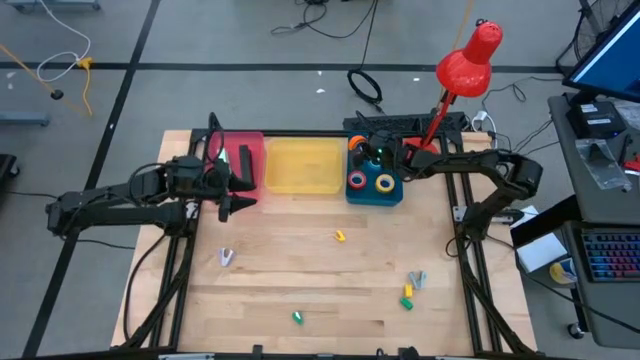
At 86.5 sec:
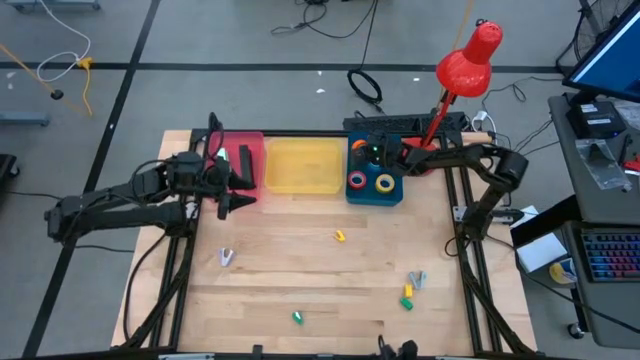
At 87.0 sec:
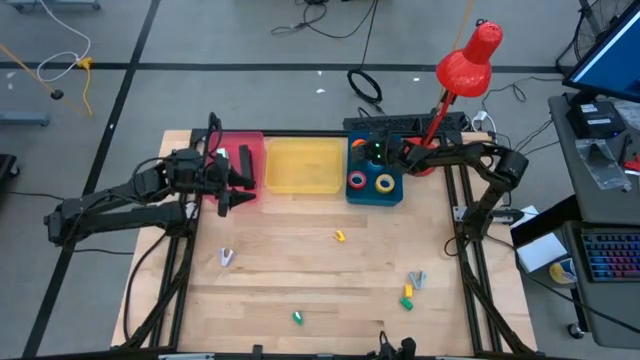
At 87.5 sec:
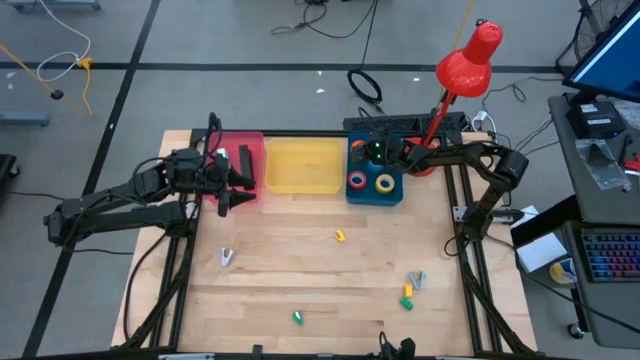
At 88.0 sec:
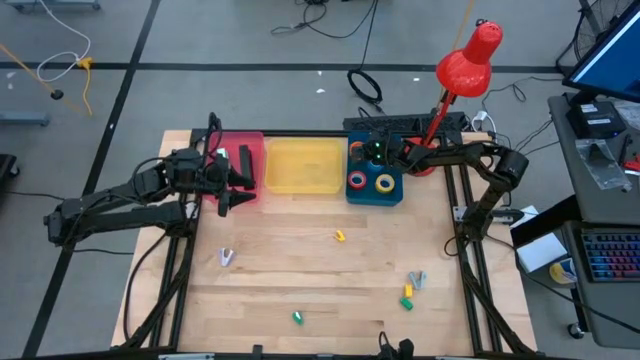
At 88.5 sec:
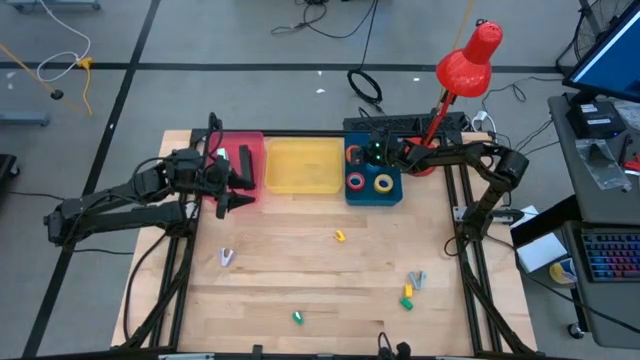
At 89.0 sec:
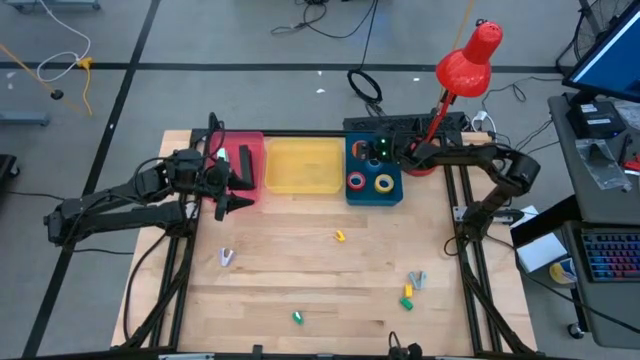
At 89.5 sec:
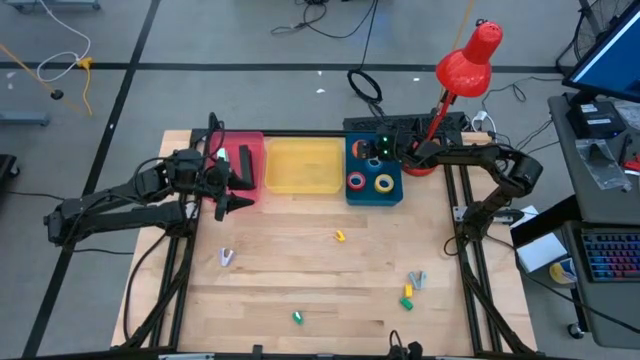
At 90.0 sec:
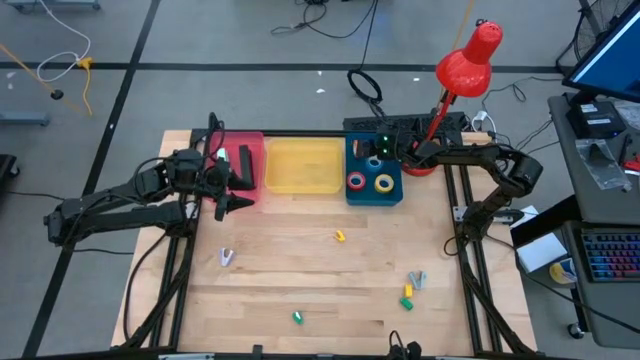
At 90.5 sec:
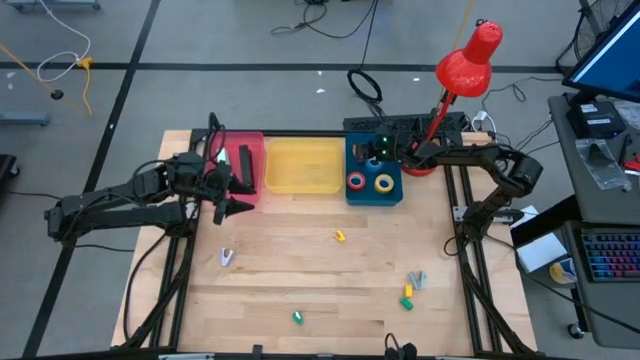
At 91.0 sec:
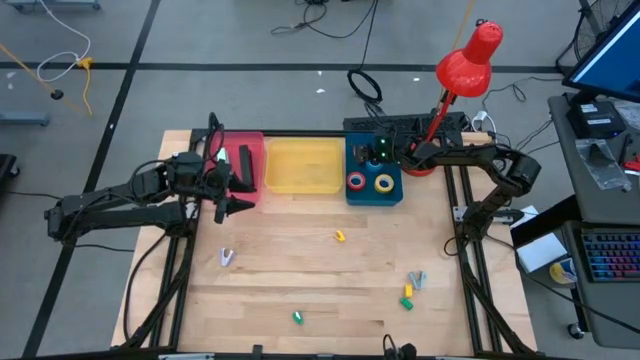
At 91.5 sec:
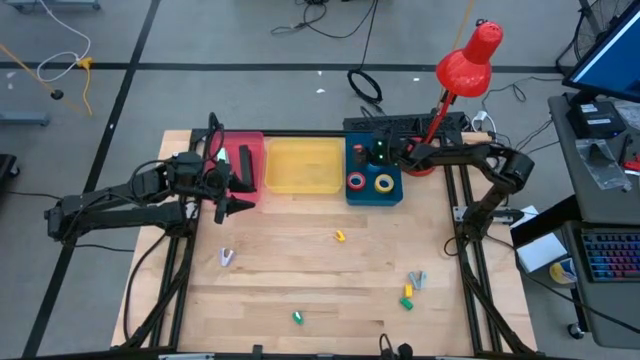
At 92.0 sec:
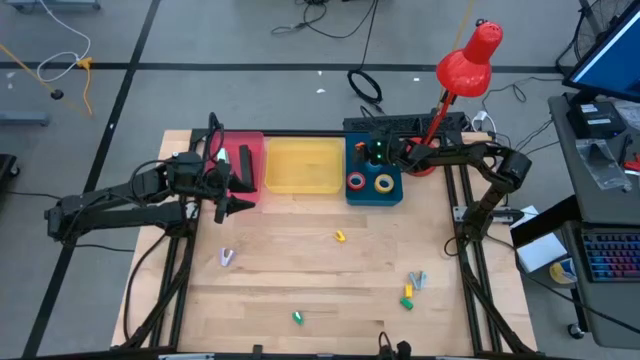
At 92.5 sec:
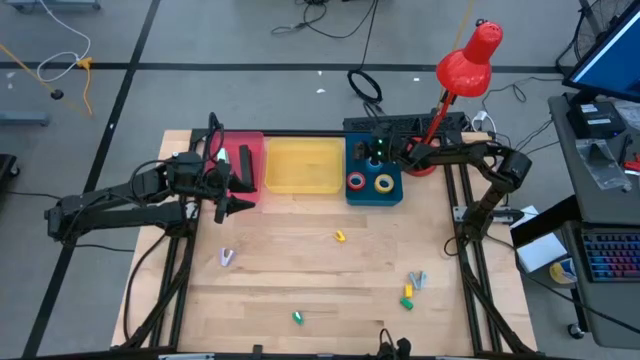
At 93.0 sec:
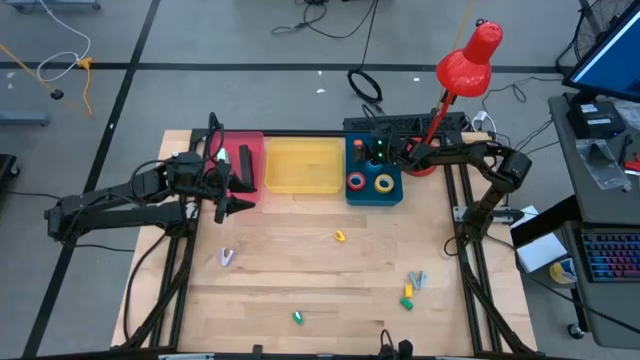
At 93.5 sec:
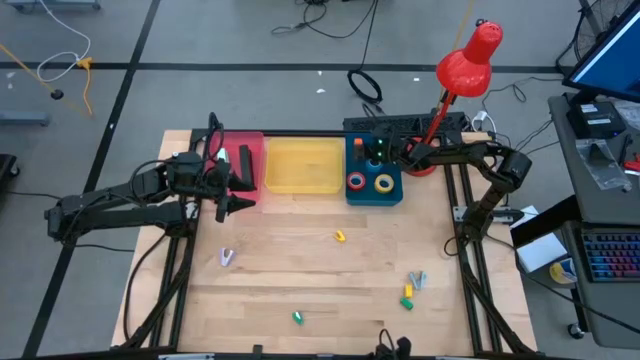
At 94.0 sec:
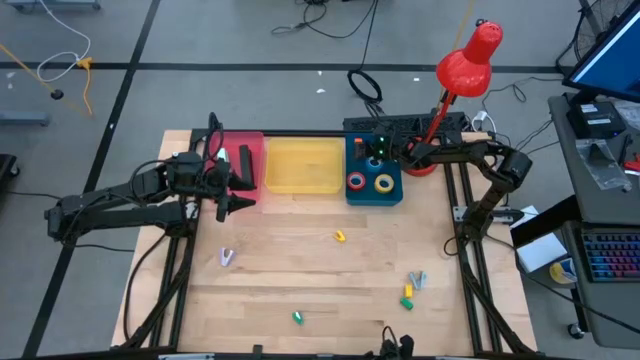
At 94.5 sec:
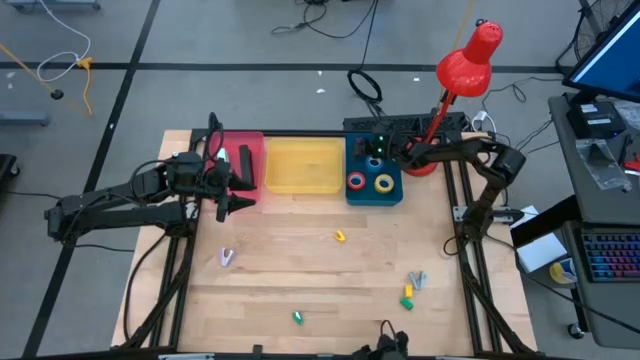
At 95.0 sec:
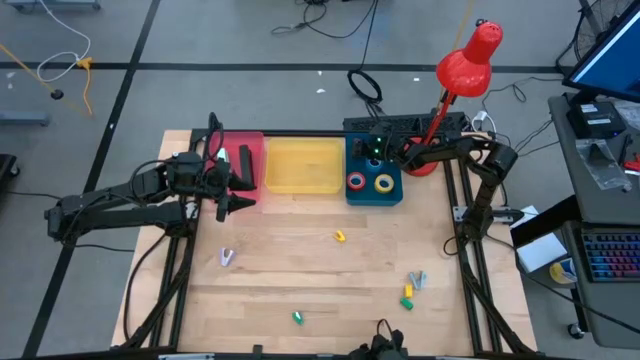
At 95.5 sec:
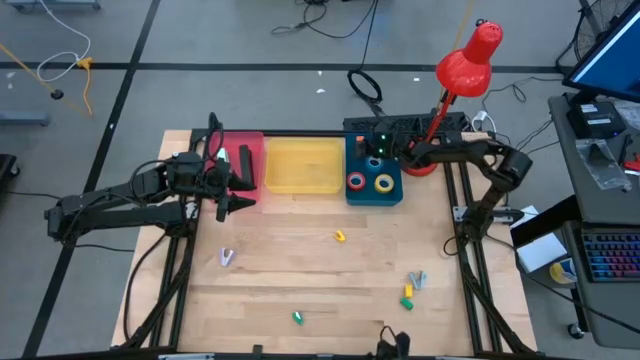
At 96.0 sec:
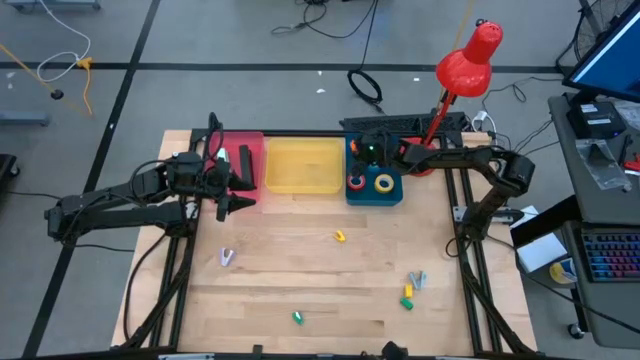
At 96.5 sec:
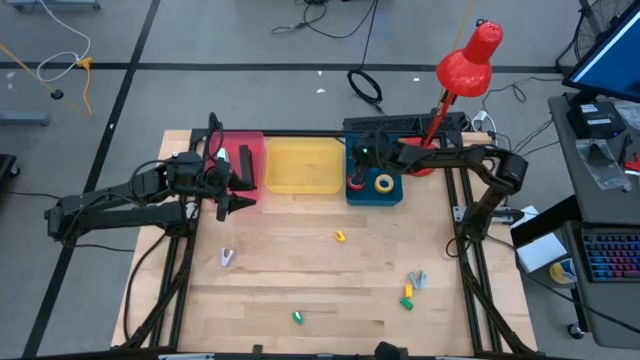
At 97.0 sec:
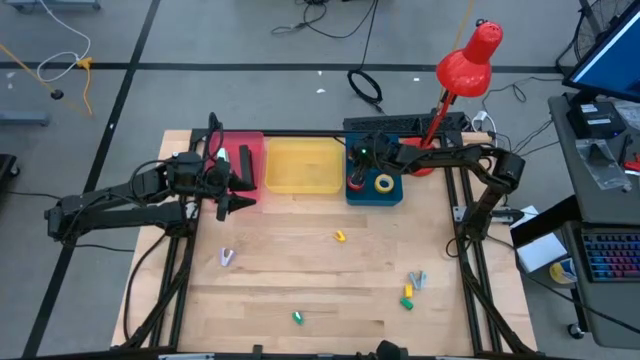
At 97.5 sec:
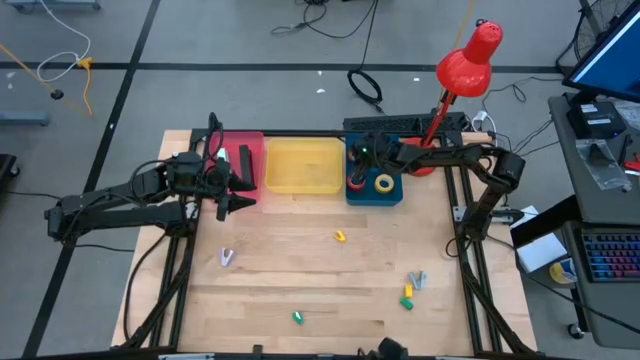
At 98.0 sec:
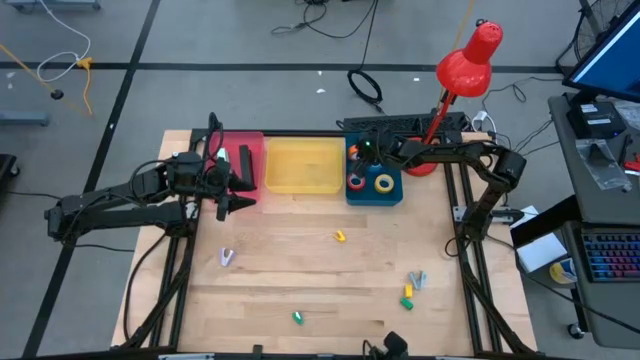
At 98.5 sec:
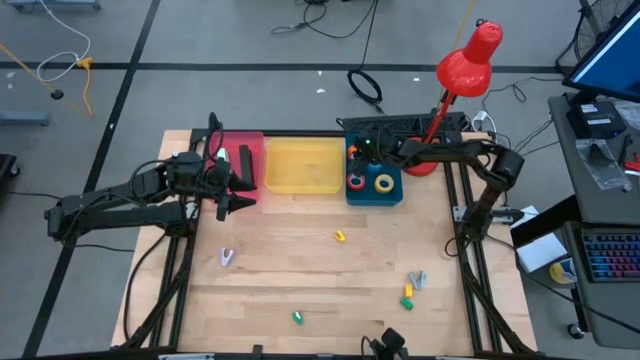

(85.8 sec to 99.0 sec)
Task: Pick and place Stapler, Stapler remover, tape
Put the orange tape into the blue bin

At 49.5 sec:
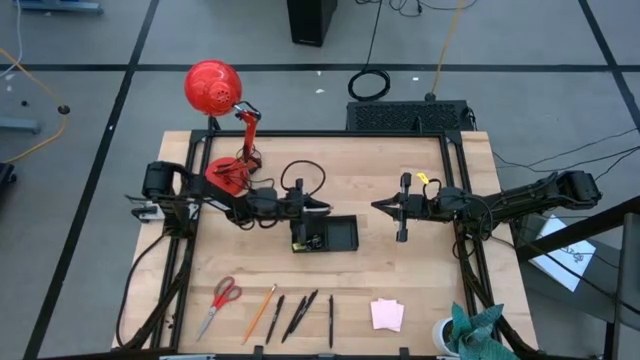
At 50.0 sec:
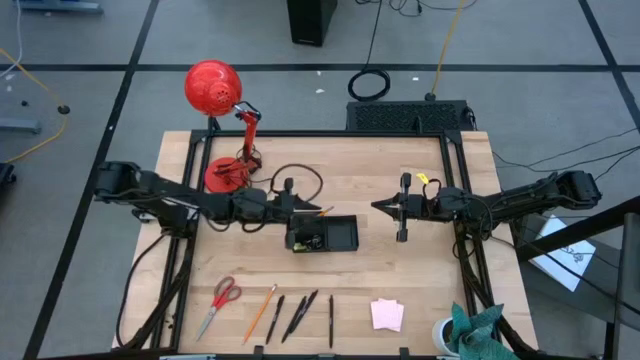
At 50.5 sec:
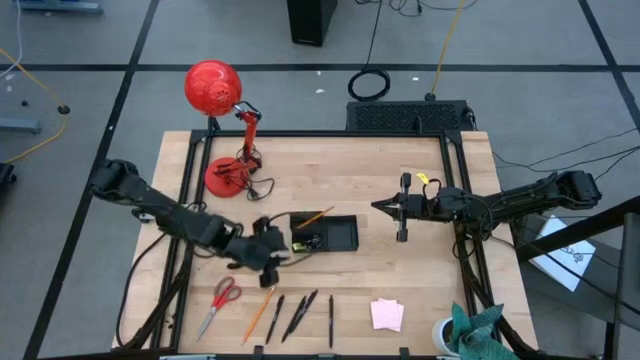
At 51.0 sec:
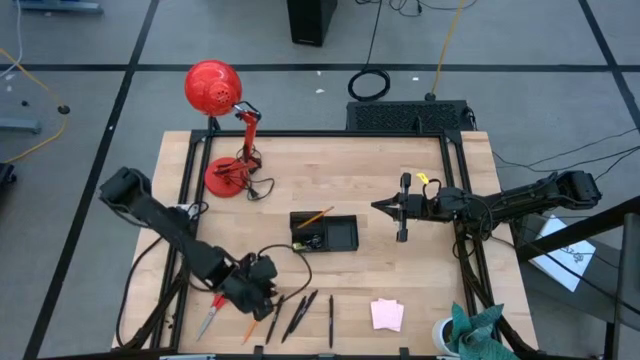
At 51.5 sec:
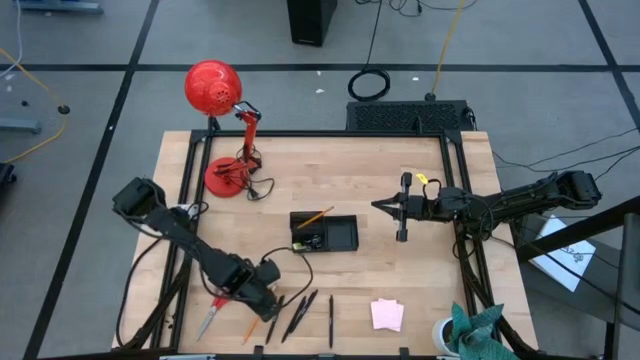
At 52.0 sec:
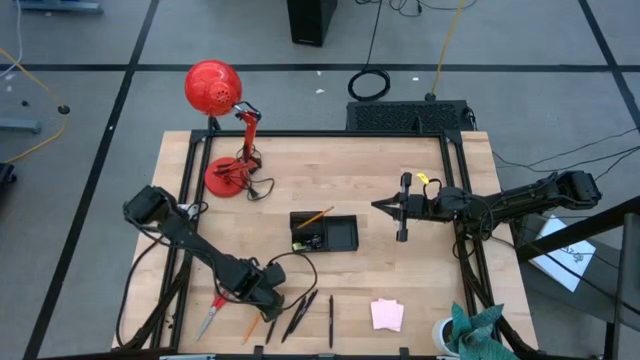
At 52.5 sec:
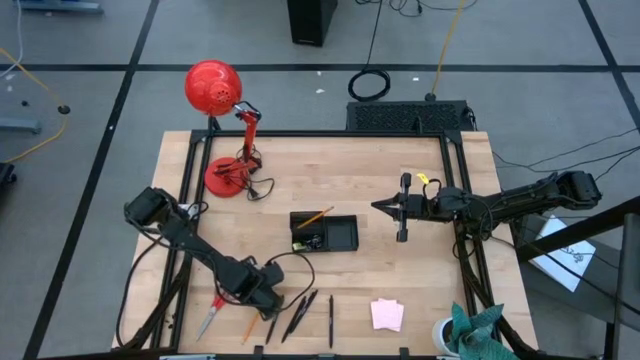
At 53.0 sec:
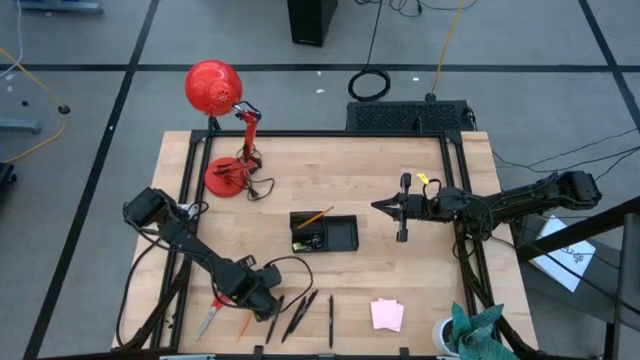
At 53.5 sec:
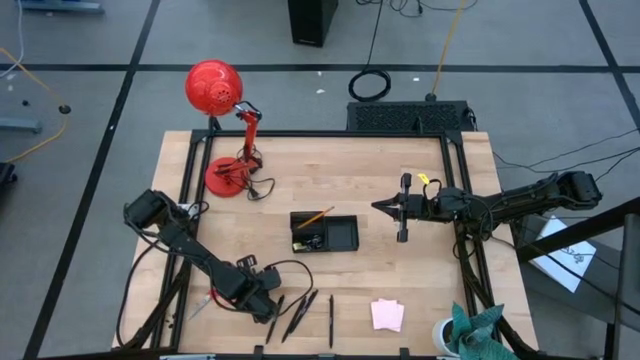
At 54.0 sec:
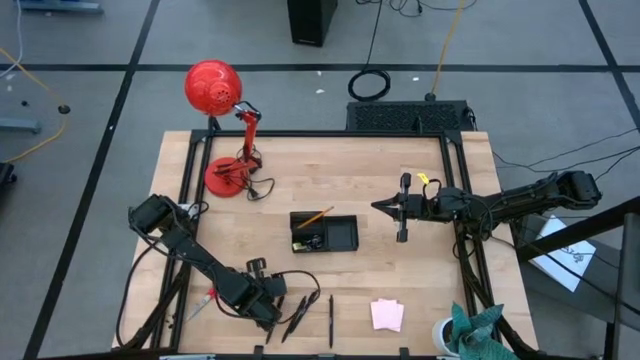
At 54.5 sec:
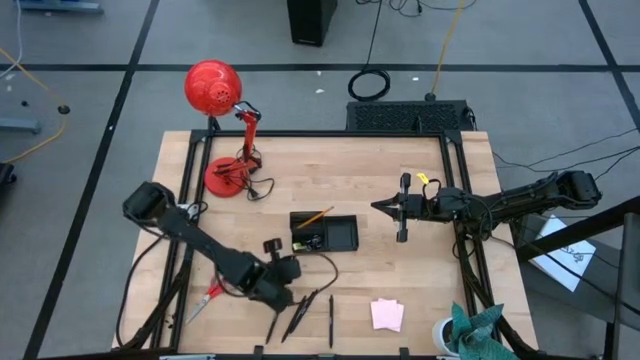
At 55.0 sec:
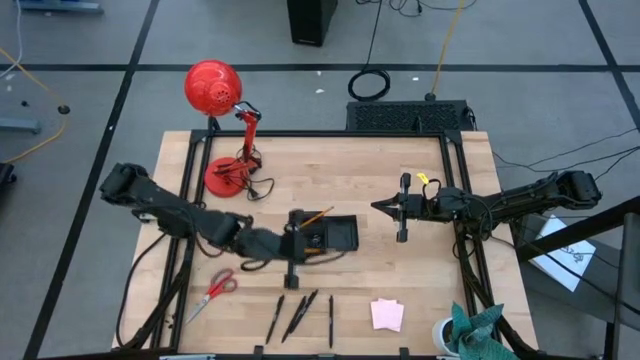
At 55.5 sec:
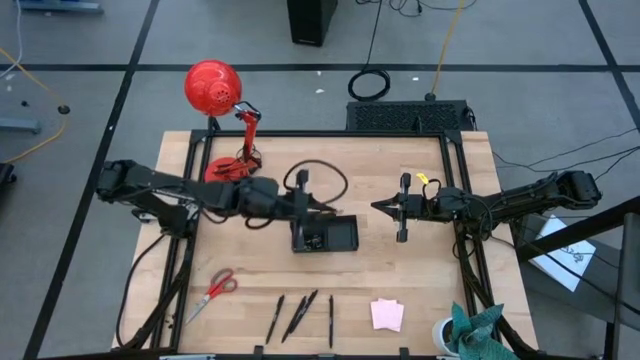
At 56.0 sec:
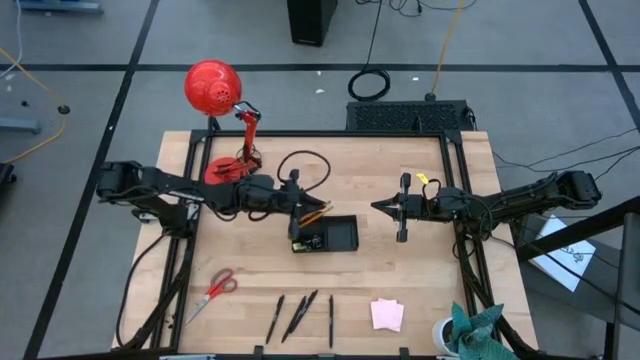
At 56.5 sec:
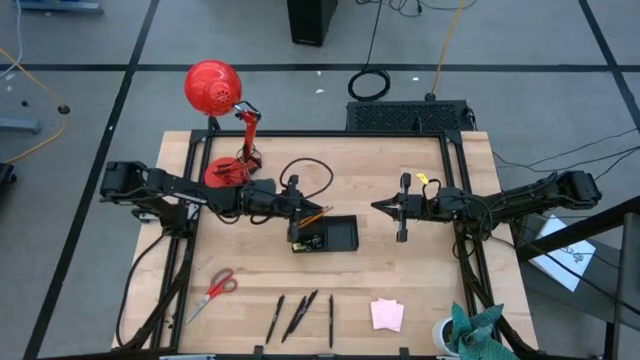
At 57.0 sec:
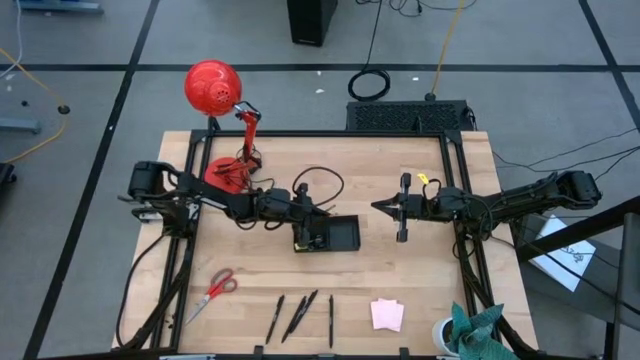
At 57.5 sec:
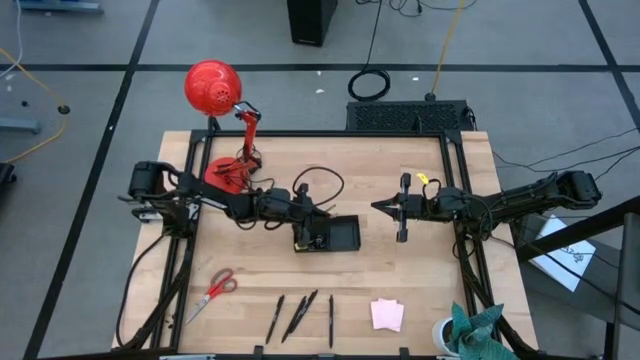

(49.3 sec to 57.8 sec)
Task: Pick and place office supplies into organizer
Put the pencil into the desk organizer
